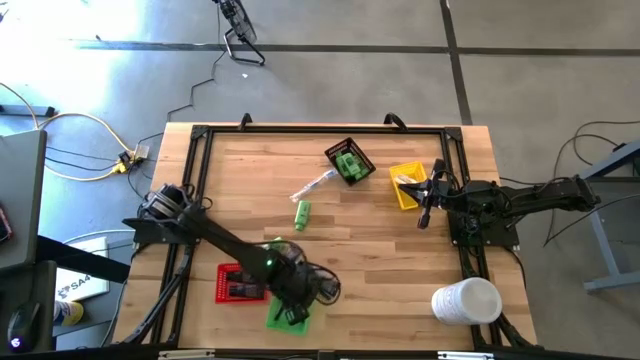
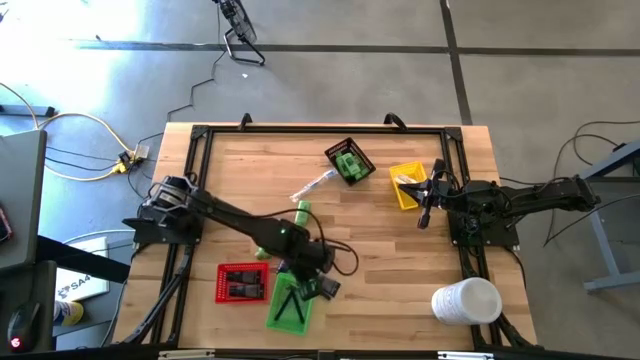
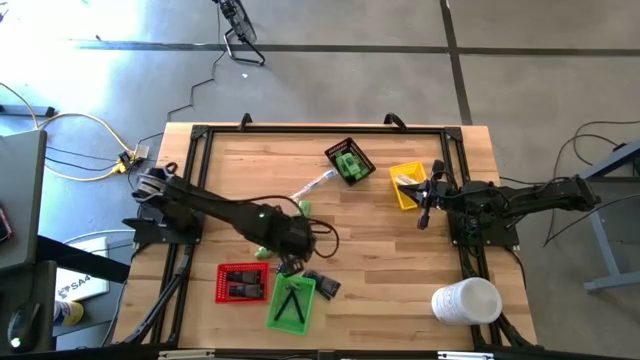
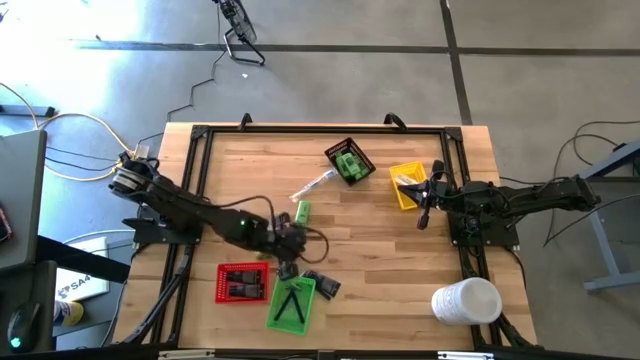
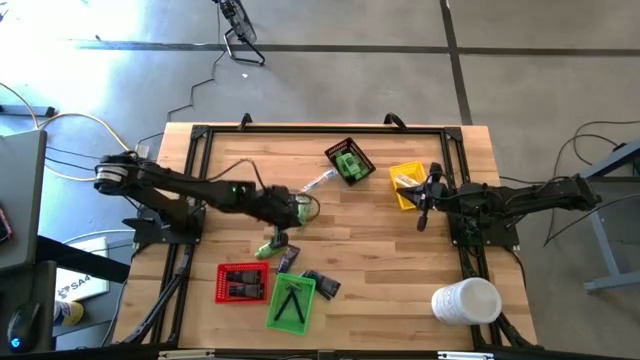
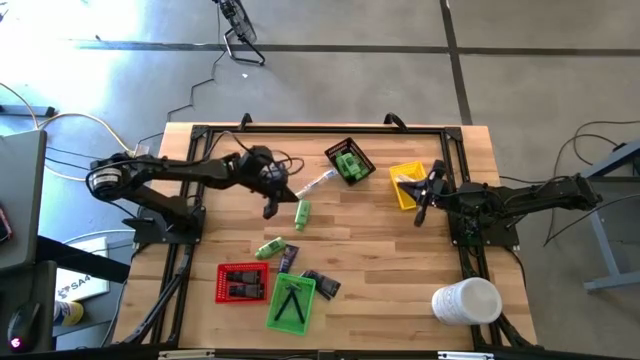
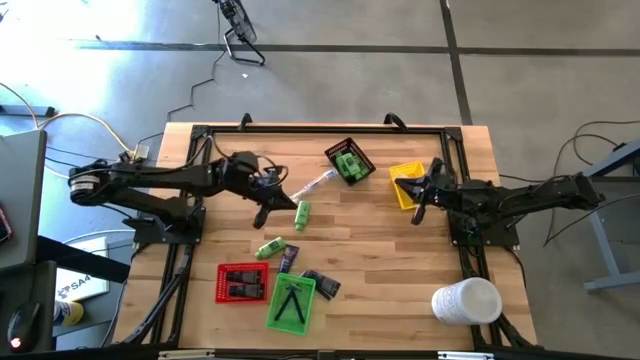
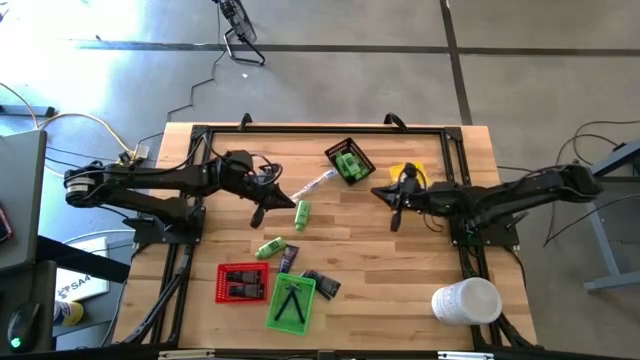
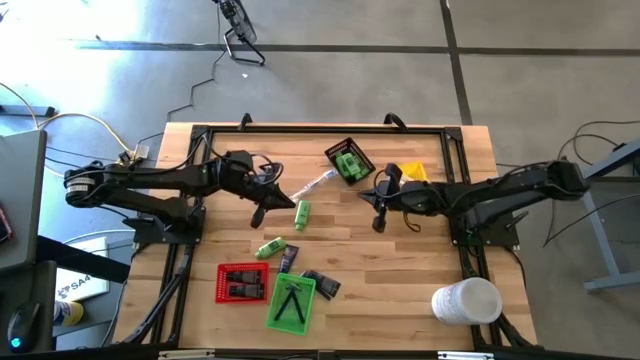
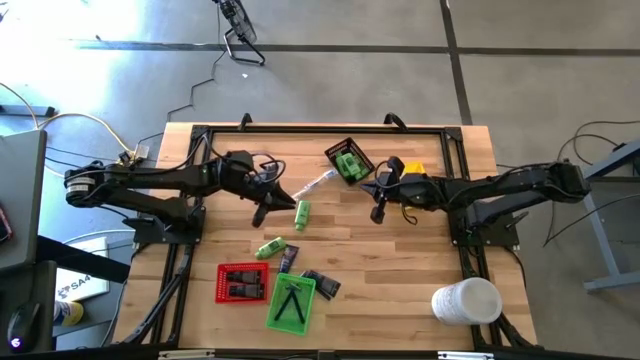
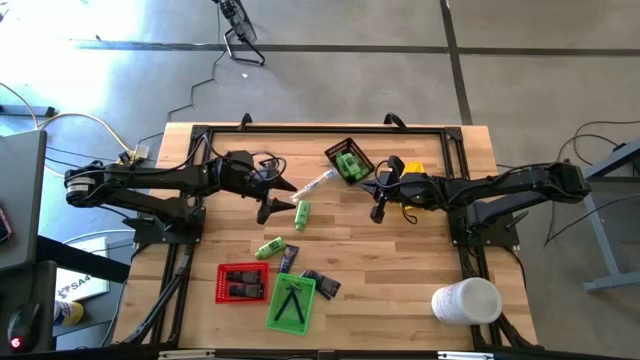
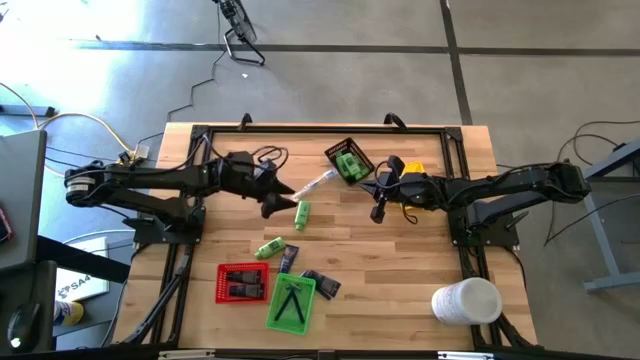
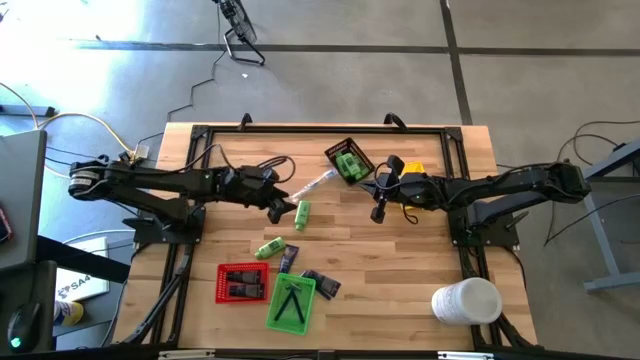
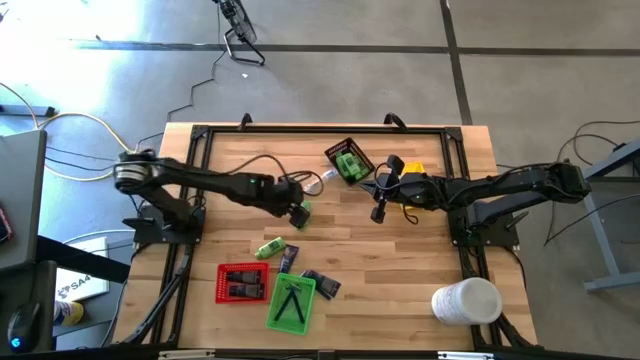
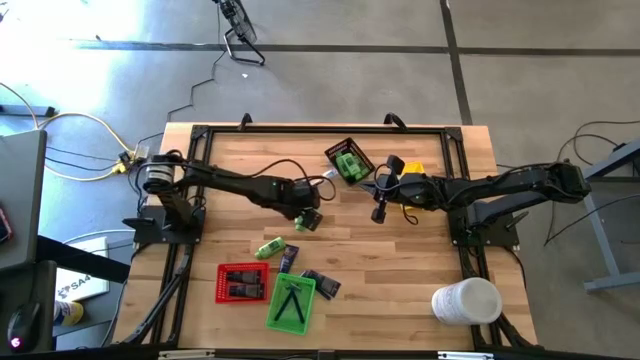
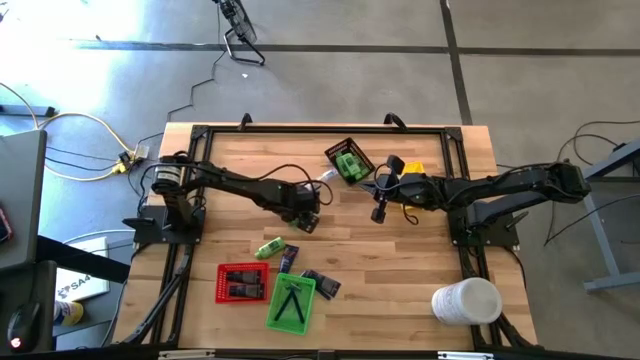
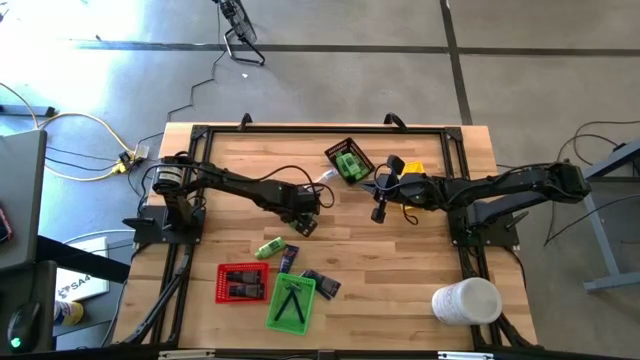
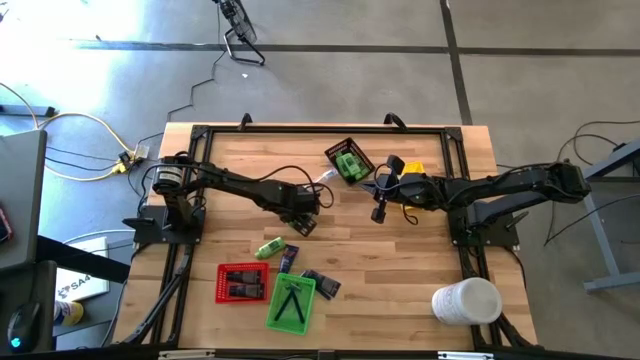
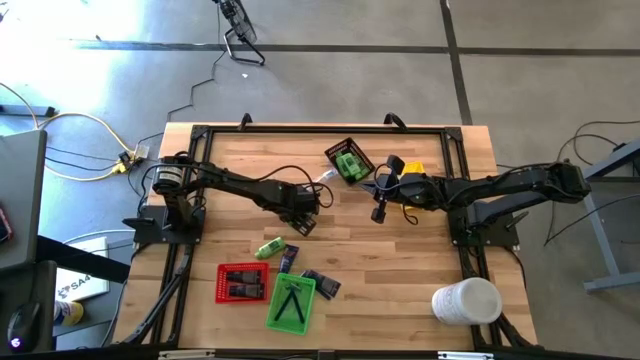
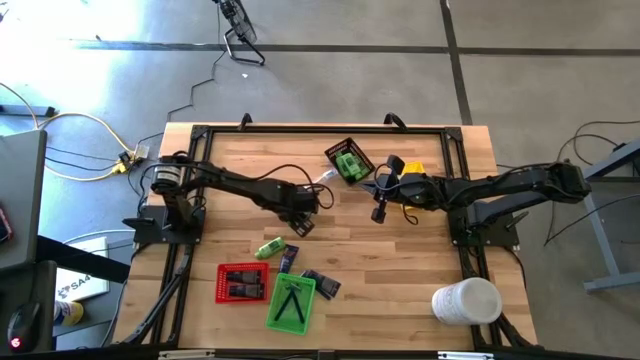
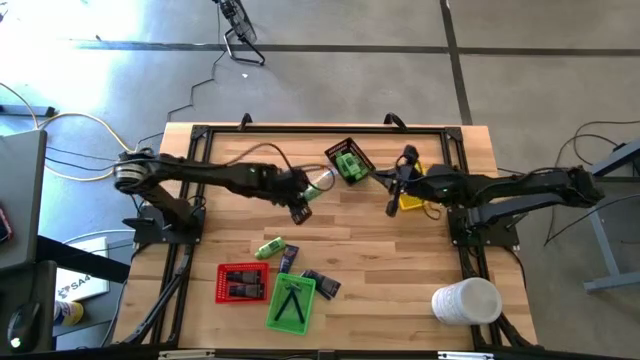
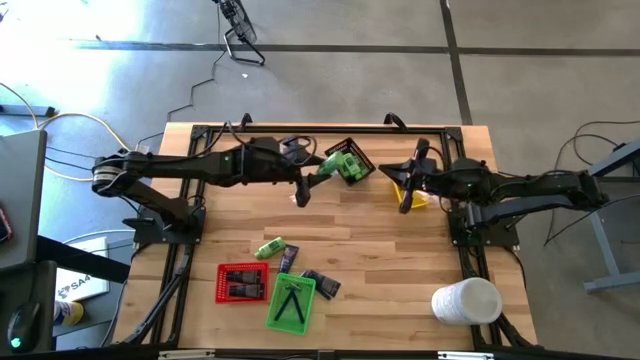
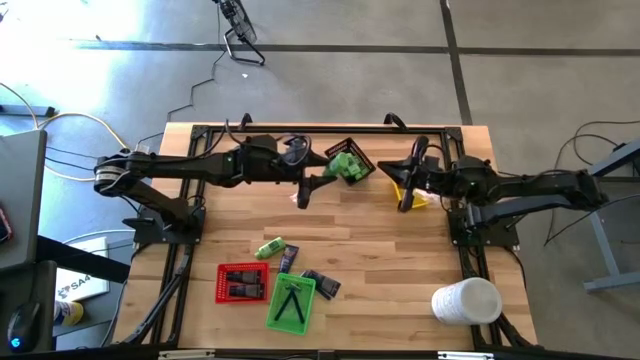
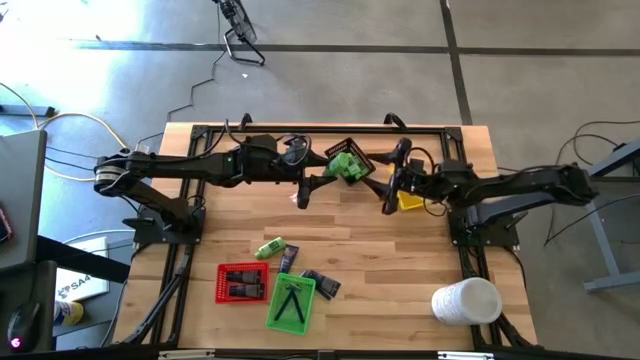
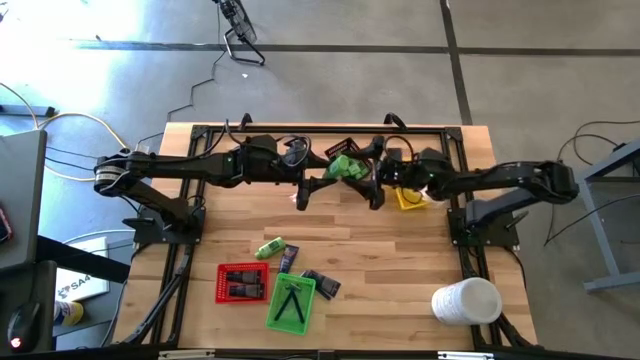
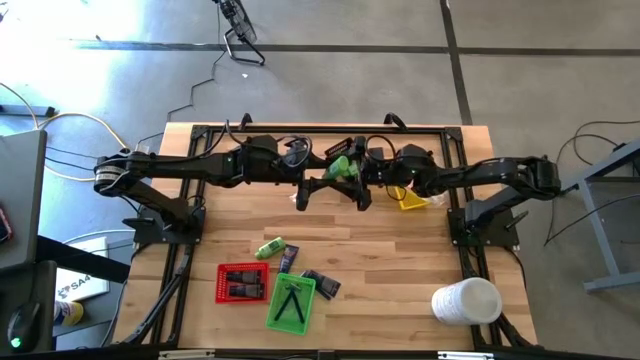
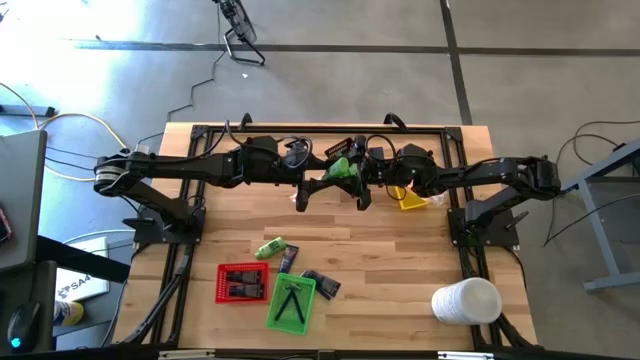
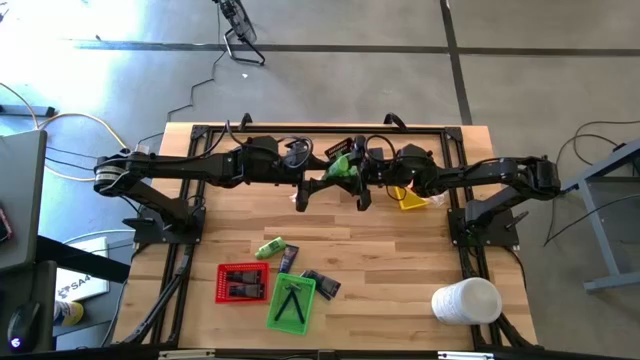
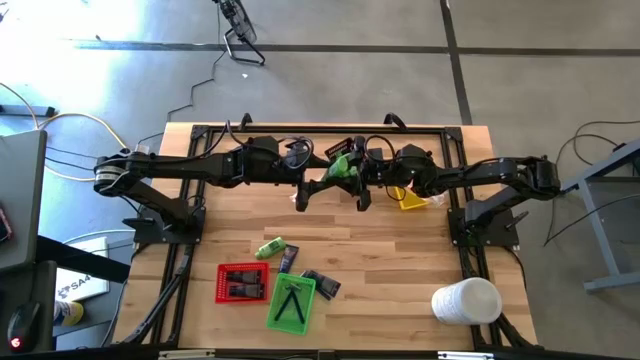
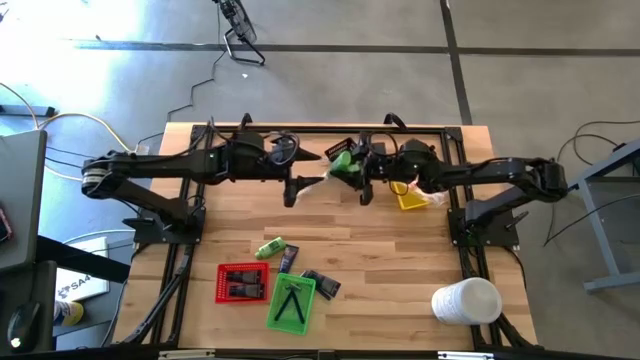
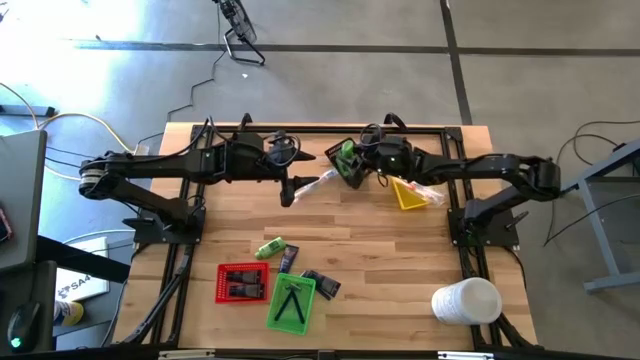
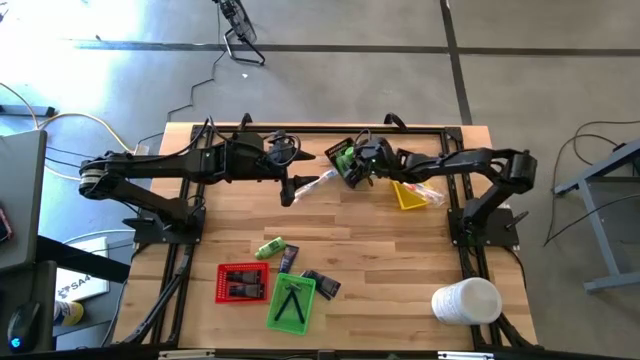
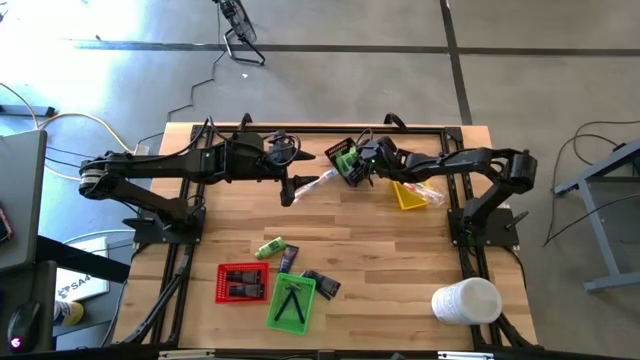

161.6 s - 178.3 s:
Task: Pick & Place Travel size toiletries
Put the shampoo into the black bin

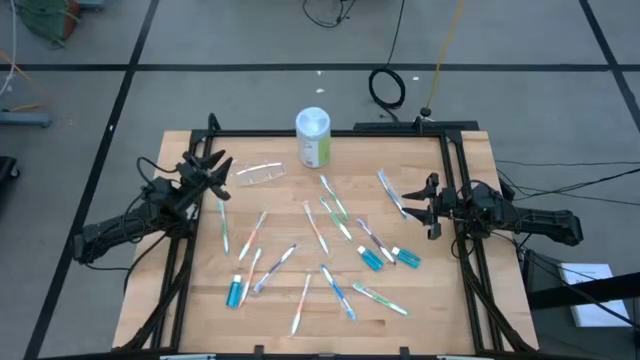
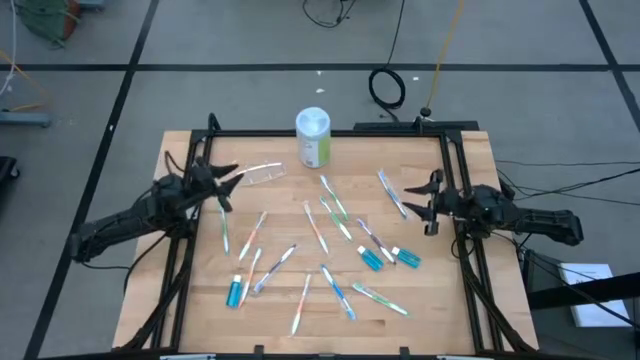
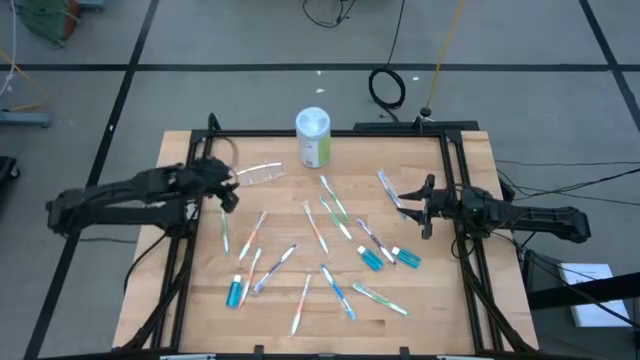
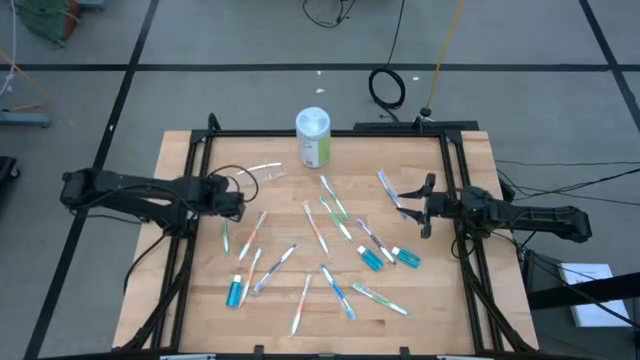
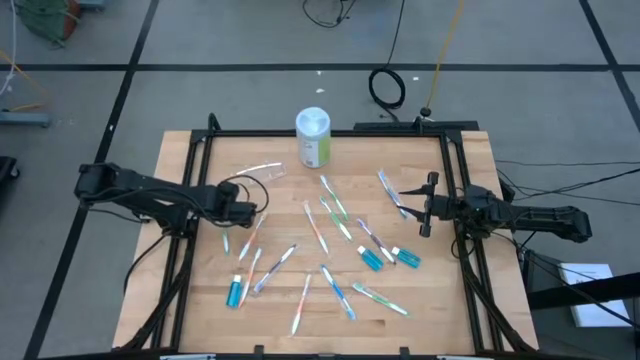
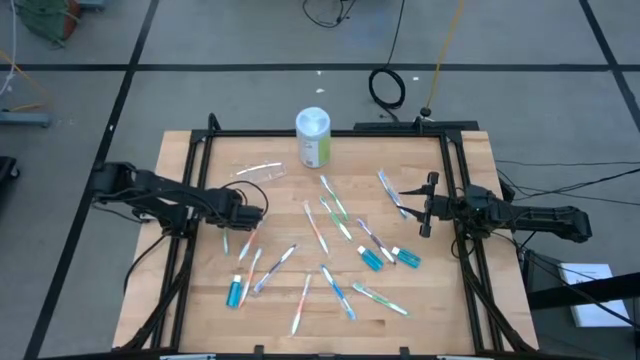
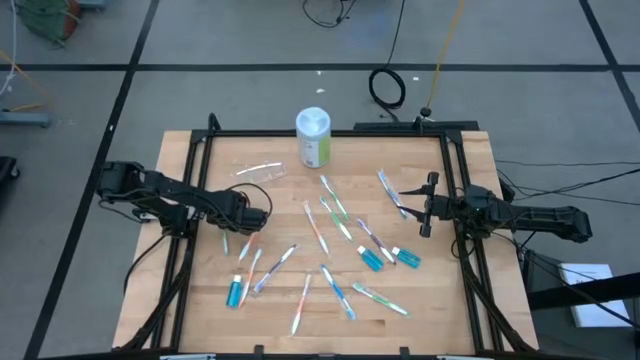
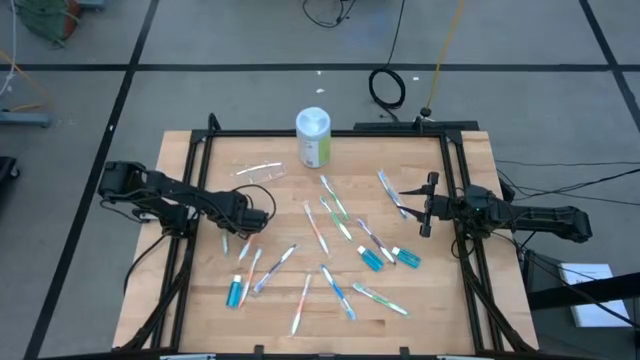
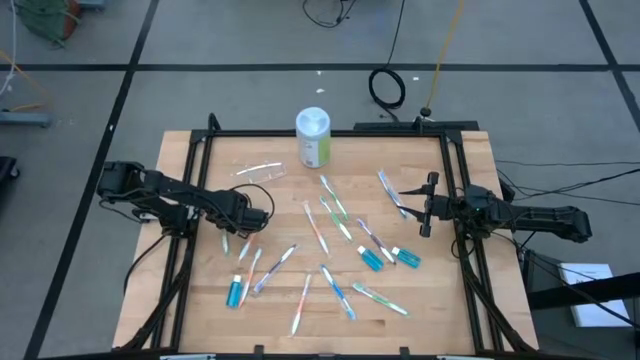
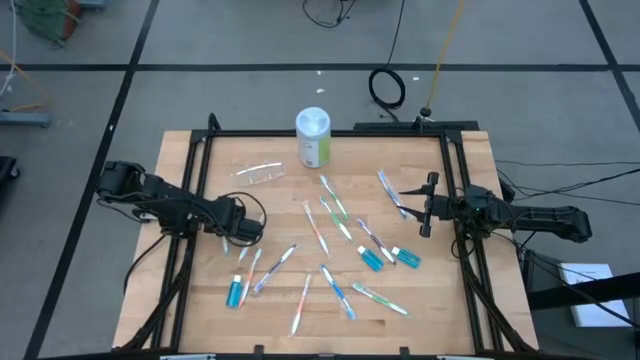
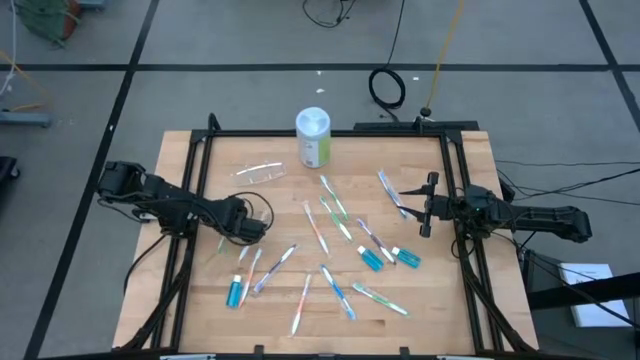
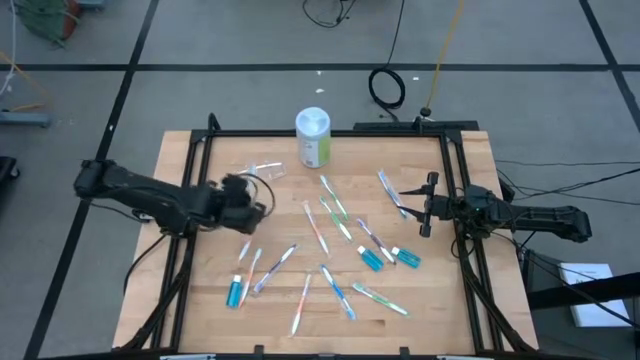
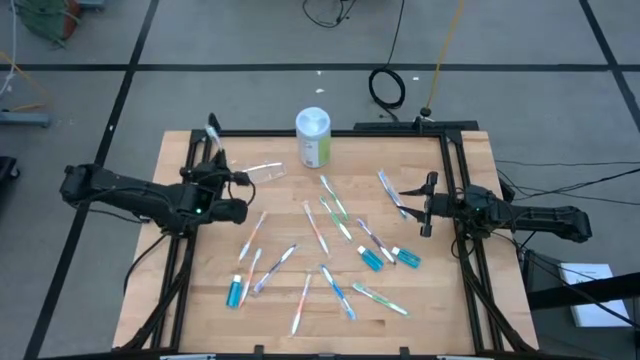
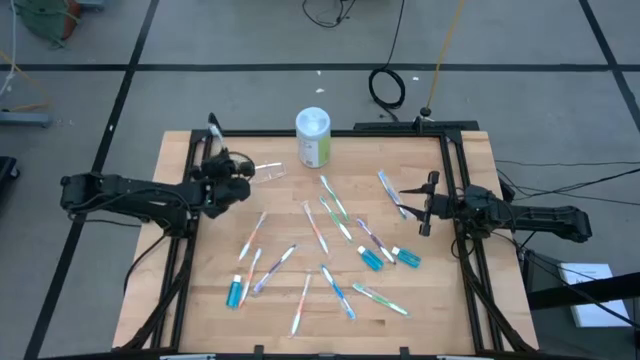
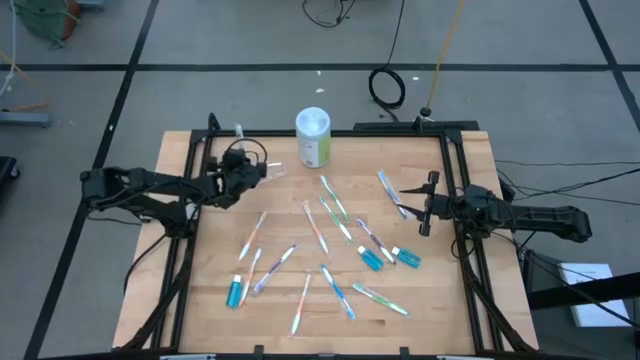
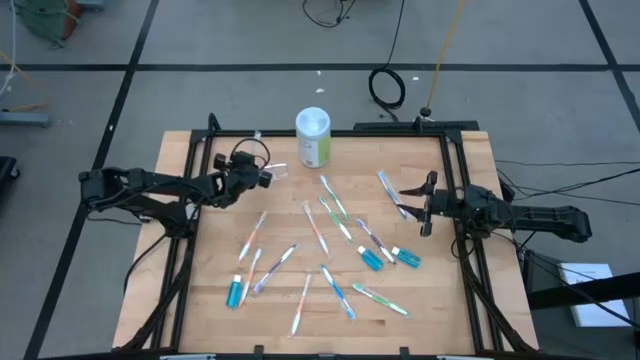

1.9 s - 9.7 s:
Task: Pick & Place toothbrushing station
Put the green toothbrush into the transparent organizer
